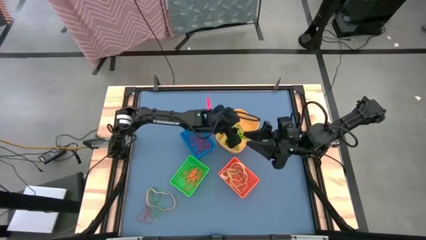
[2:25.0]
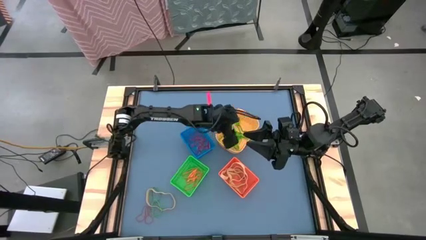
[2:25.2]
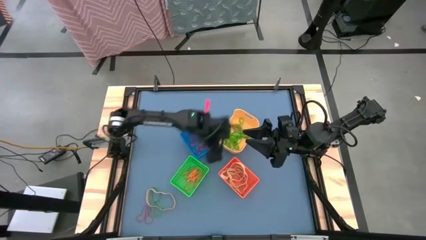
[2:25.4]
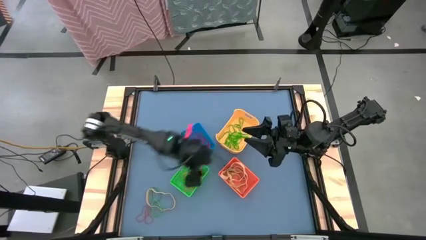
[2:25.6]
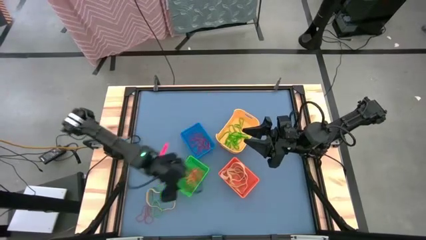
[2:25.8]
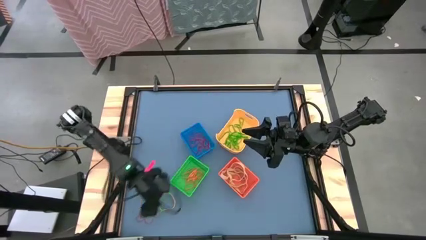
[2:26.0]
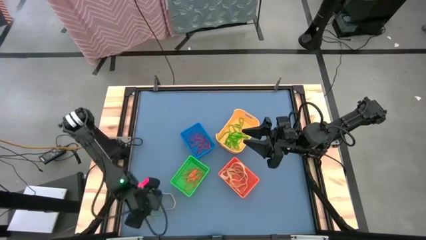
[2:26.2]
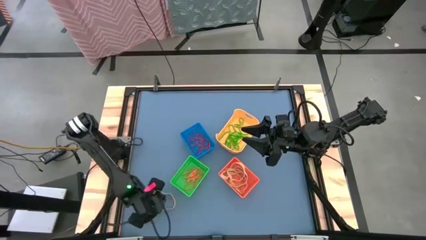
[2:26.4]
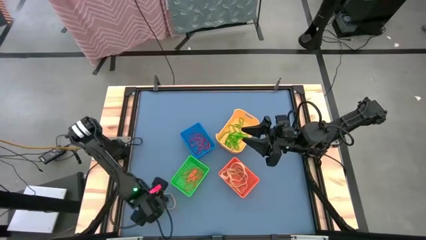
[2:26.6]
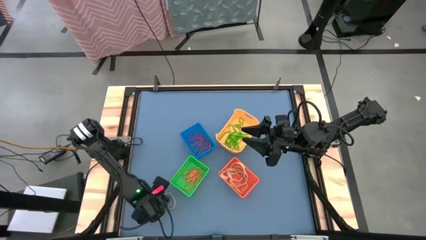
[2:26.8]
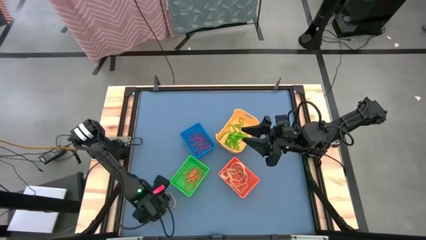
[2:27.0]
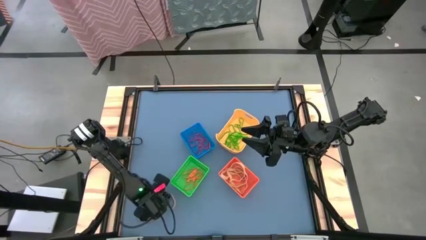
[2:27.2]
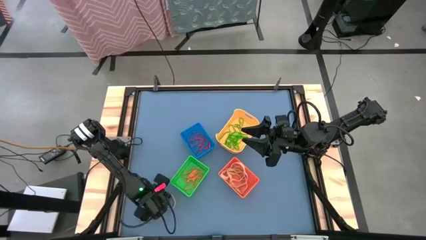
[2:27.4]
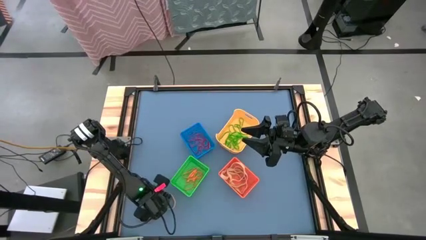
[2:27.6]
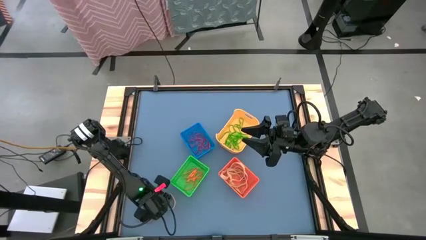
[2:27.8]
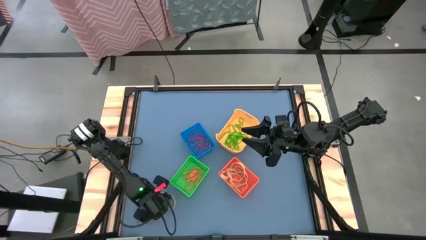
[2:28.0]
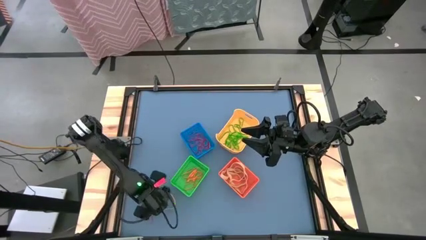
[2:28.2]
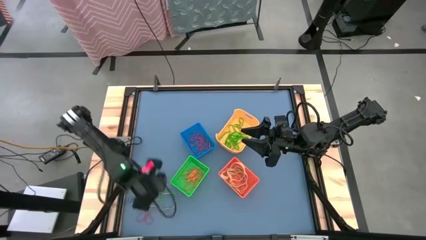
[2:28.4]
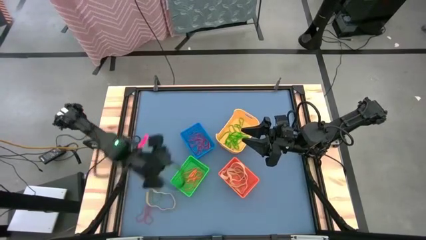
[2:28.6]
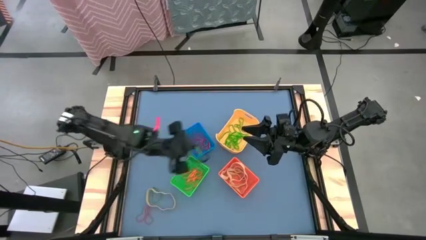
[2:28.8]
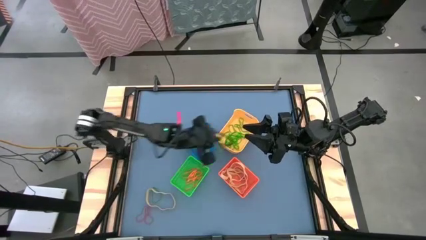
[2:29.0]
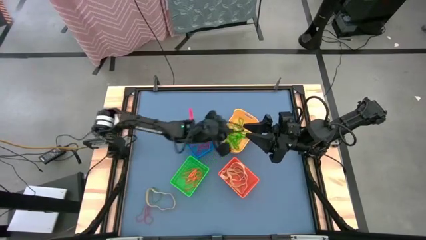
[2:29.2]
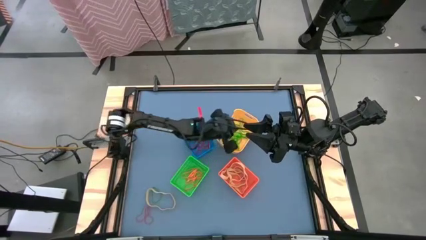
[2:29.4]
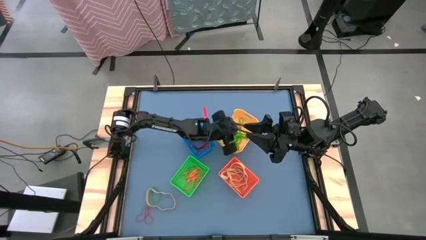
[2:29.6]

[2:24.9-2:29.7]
Task: Sort rubber bands into baskets
Put the green rubber band into the yellow bin

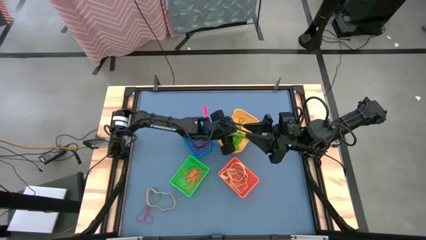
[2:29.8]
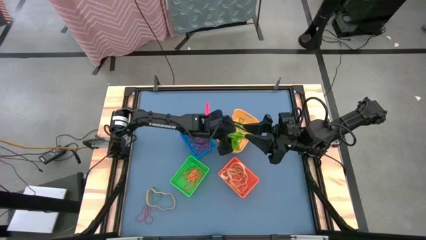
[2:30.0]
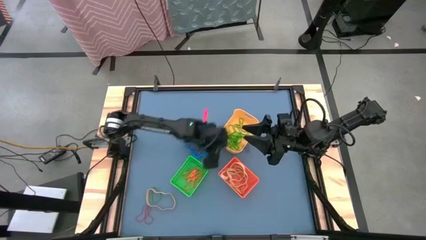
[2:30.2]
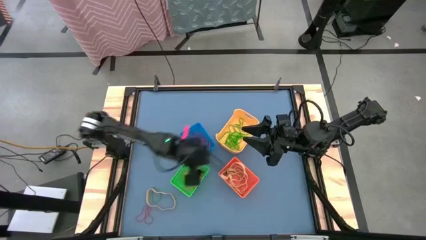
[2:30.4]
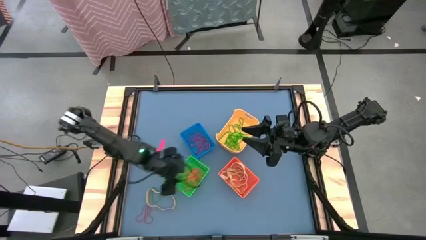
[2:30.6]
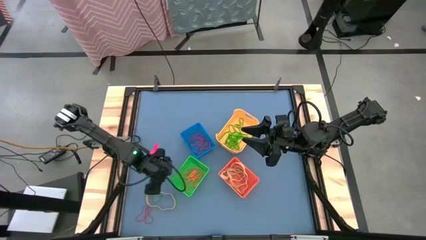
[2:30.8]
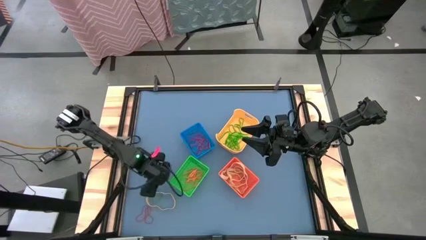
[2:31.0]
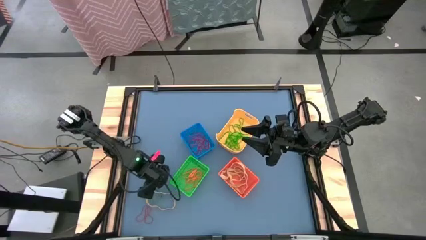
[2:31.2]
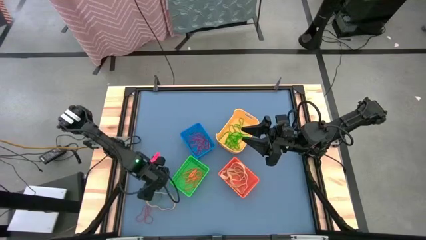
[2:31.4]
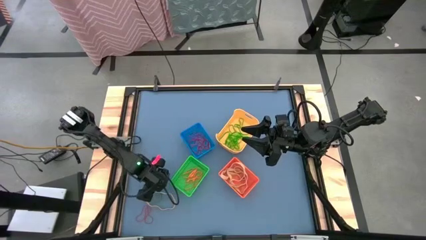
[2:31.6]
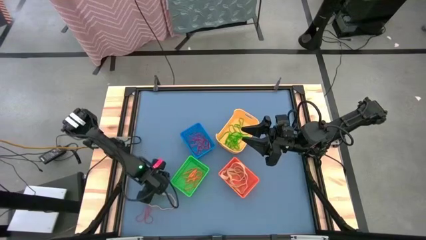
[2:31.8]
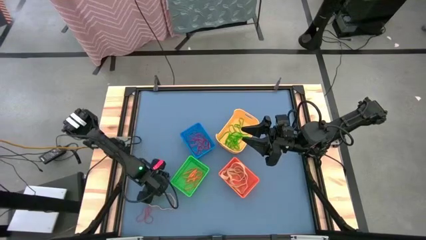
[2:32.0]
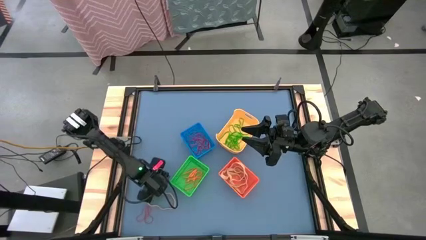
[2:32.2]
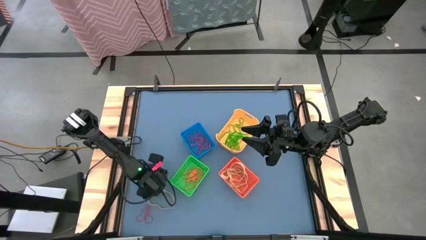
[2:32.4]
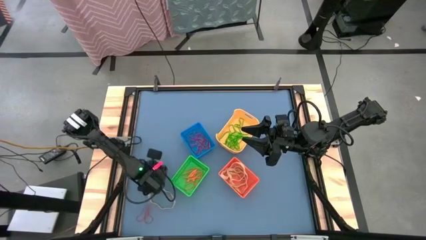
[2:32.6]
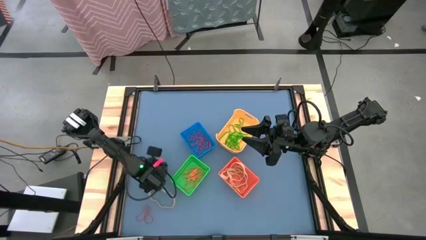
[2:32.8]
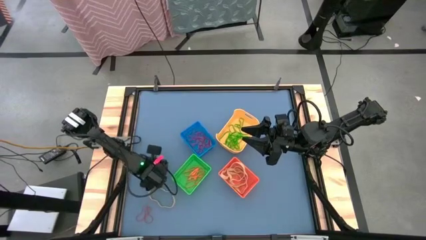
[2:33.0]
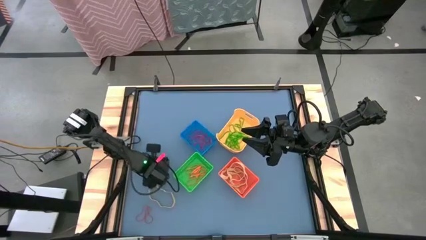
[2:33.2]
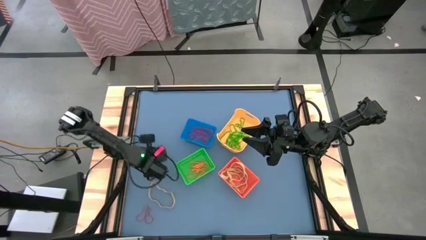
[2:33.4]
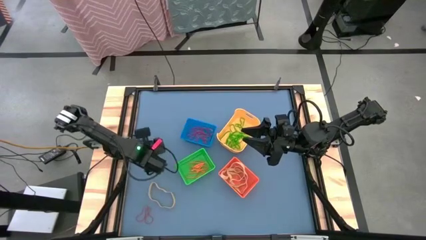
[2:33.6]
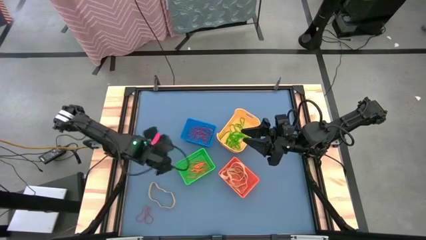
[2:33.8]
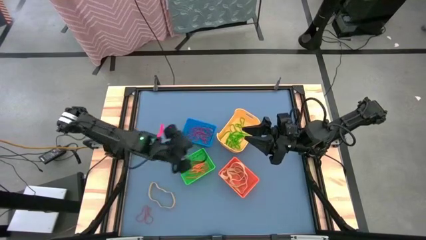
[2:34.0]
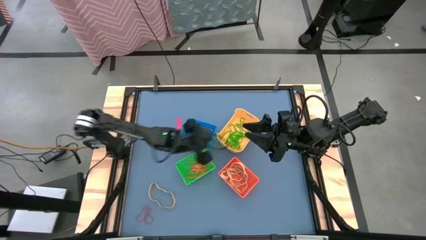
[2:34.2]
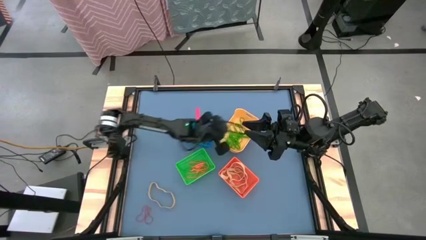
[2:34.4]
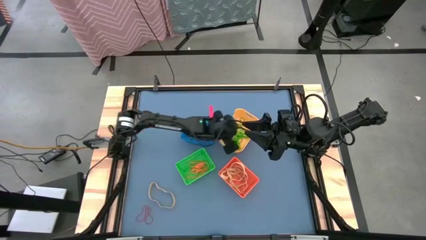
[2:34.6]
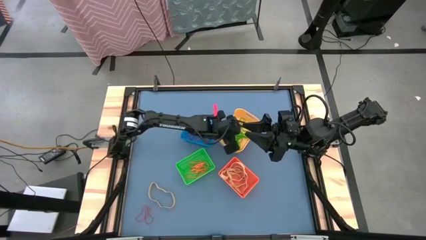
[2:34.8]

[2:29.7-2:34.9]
Put the green rubber band into the yellow bin

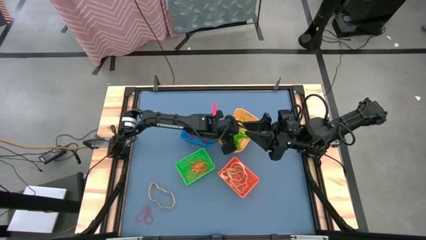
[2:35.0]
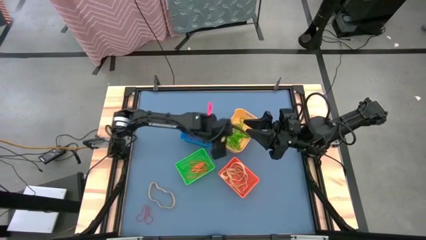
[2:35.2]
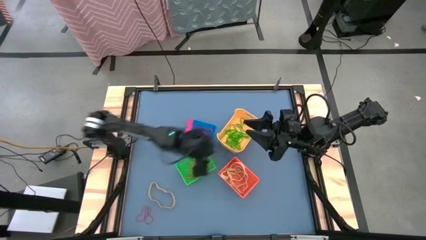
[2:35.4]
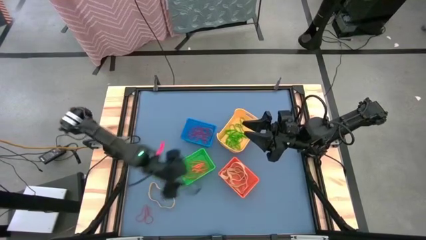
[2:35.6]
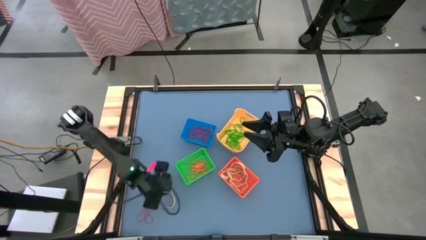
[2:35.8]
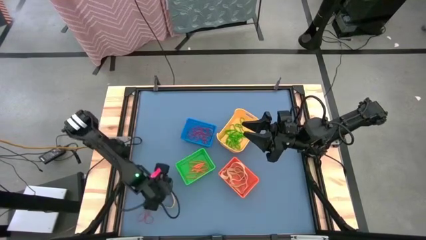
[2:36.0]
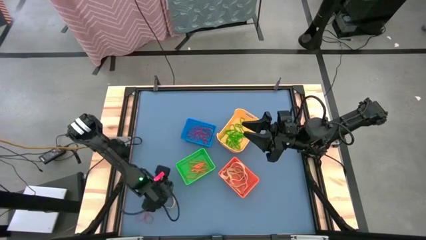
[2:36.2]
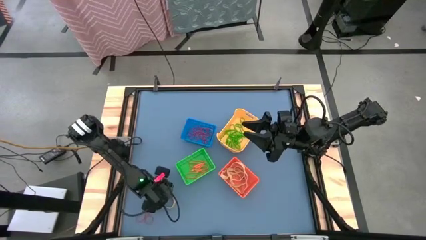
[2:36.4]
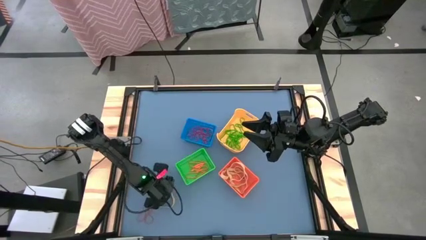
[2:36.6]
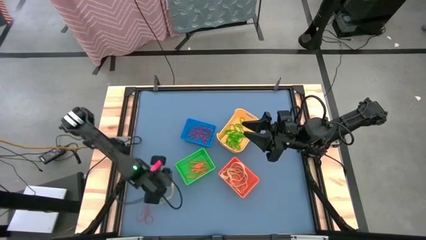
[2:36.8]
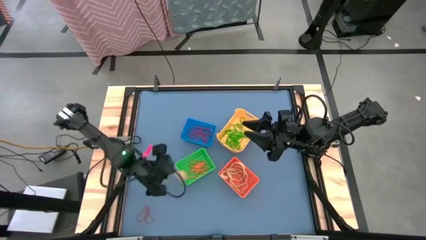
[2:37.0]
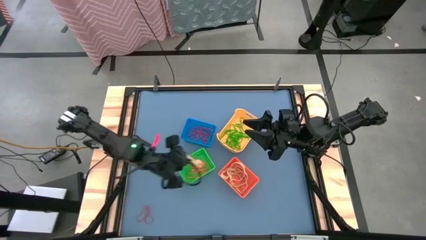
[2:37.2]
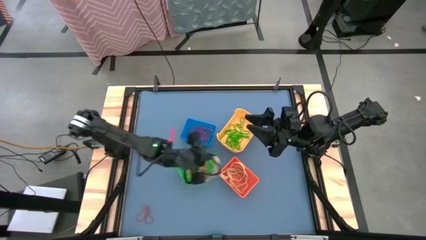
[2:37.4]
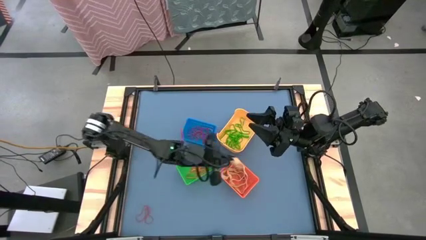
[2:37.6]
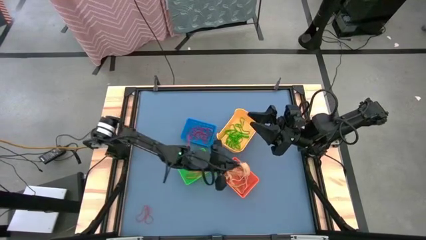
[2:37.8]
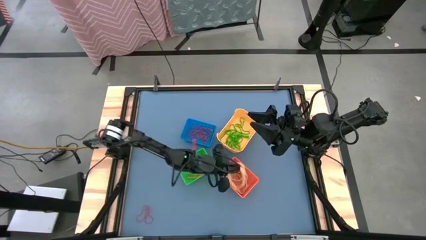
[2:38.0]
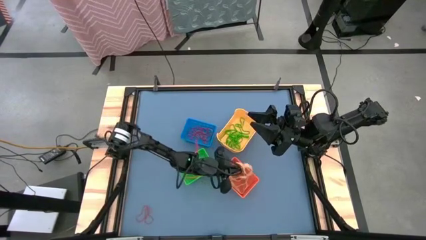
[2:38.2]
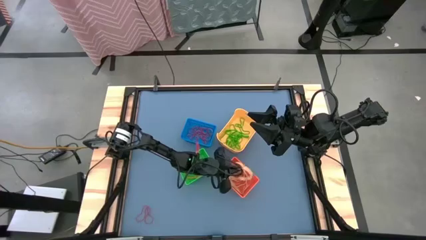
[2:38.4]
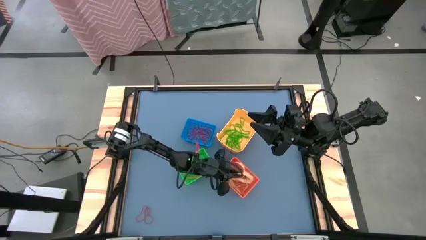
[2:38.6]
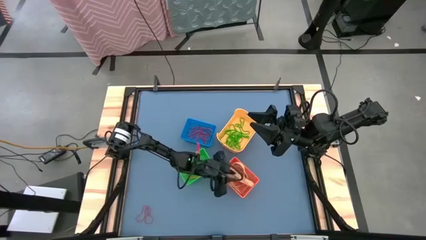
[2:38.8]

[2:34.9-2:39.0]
Put the yellow rubber band into the orange bin

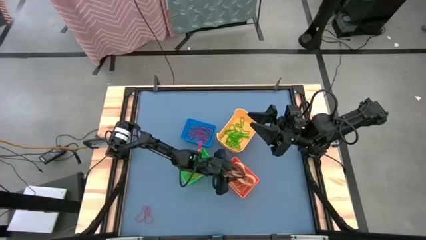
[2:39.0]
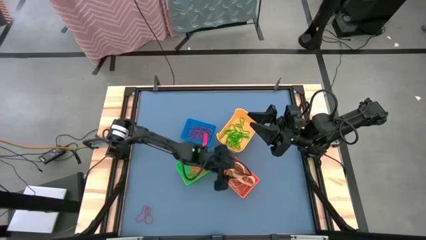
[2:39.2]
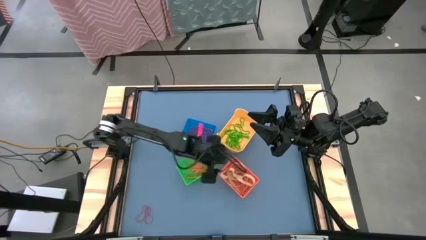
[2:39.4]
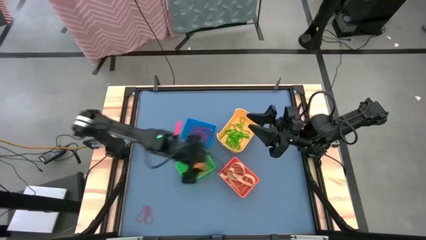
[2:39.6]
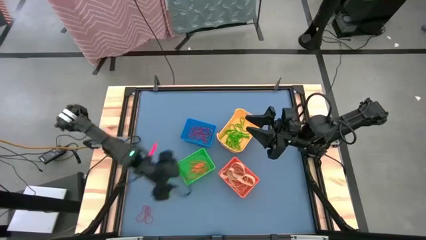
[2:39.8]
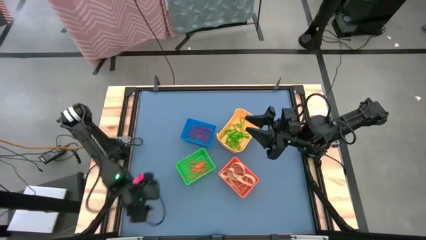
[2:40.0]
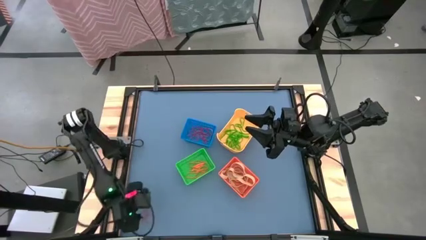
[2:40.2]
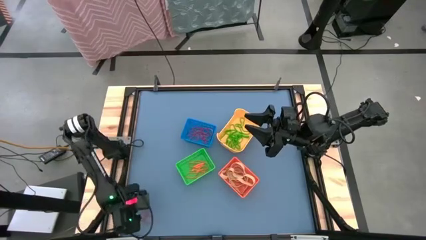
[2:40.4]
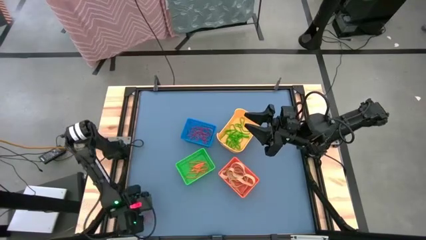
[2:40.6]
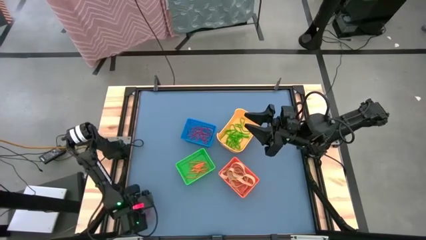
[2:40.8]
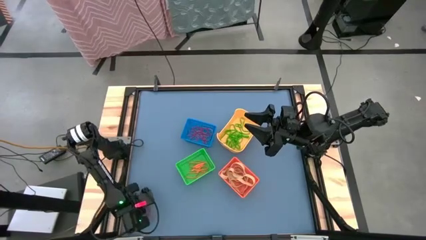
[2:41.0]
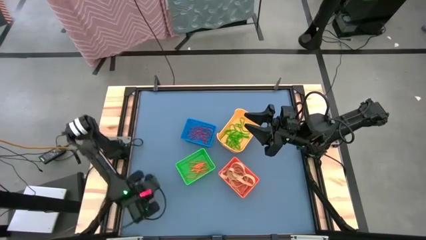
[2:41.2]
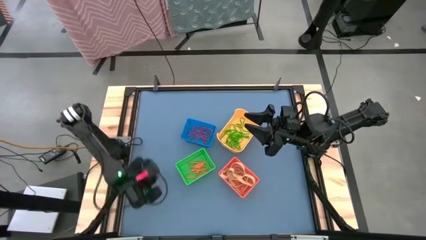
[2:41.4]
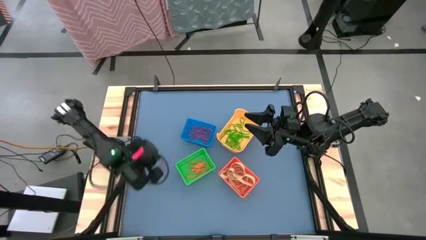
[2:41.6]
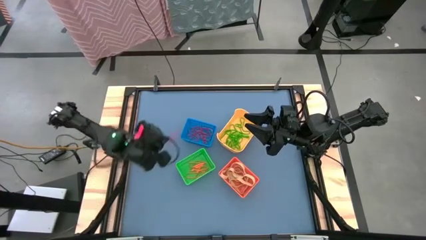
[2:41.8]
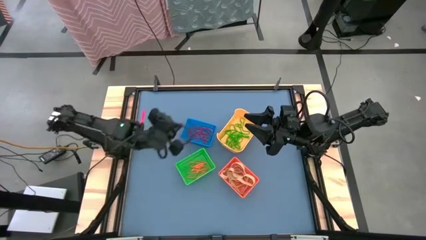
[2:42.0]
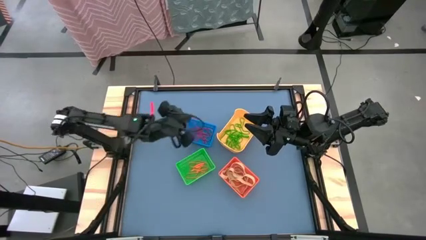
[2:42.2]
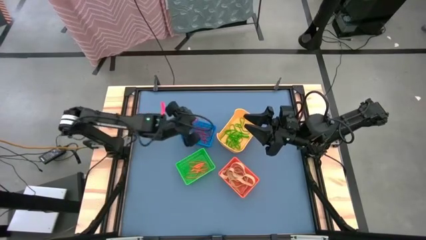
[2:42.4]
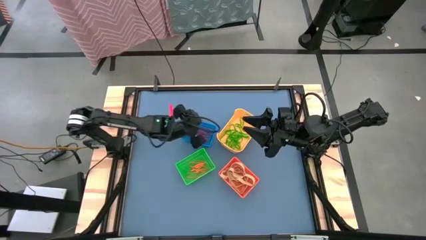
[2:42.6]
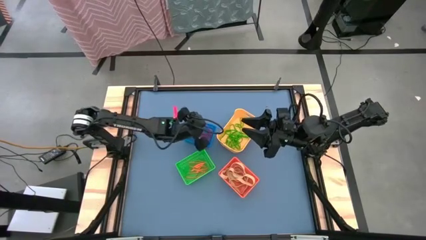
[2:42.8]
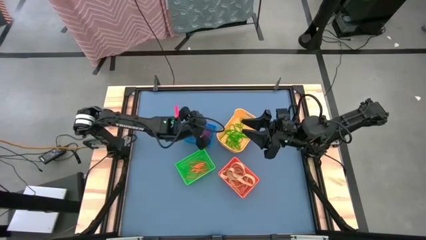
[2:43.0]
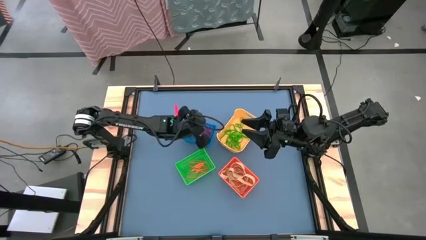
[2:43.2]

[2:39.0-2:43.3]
Put the red rubber band into the blue bin
